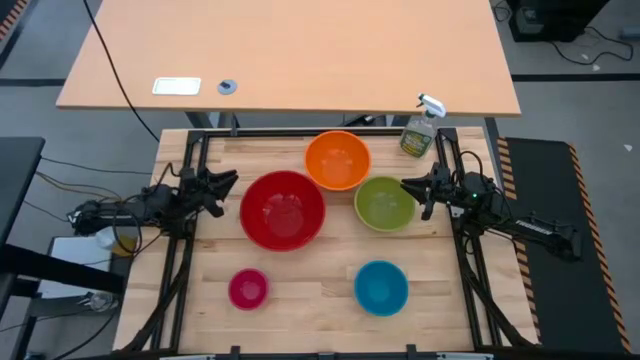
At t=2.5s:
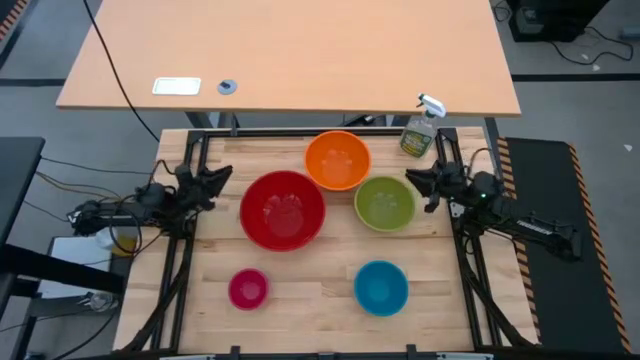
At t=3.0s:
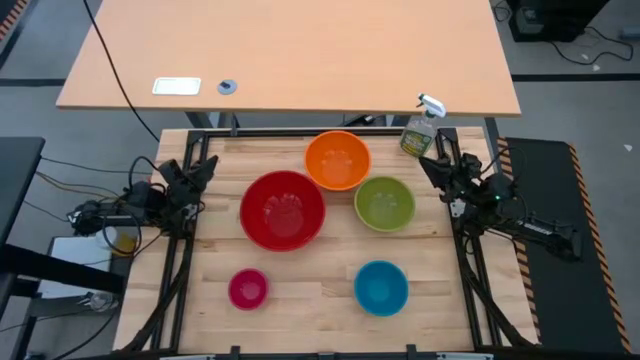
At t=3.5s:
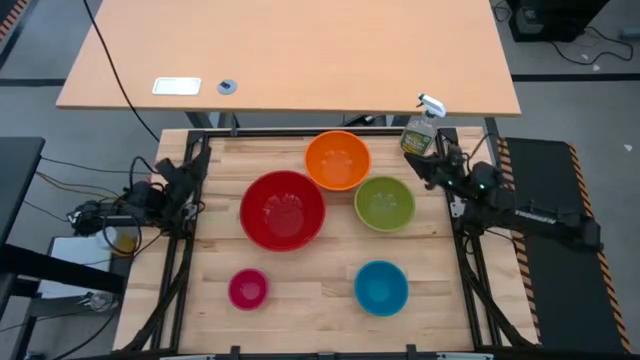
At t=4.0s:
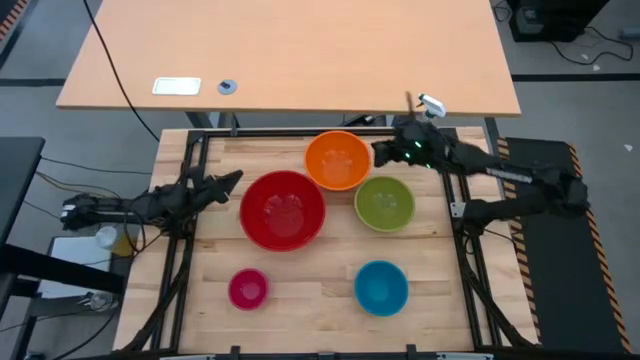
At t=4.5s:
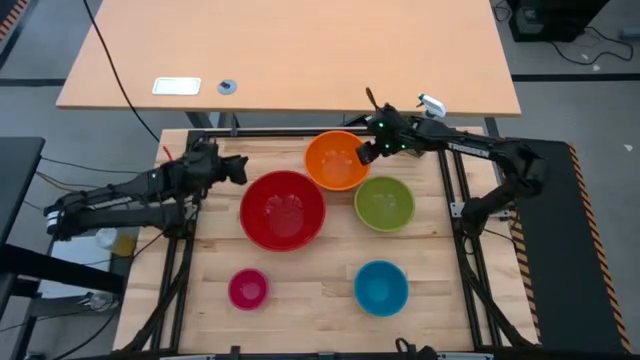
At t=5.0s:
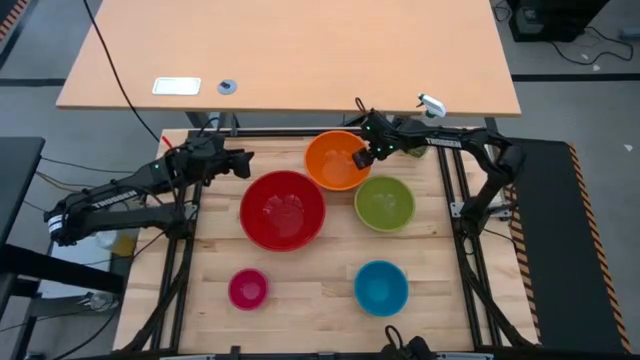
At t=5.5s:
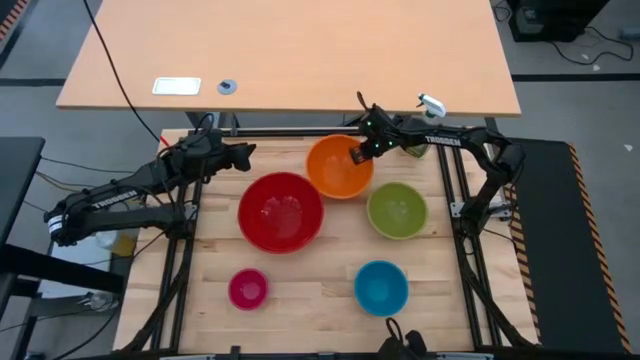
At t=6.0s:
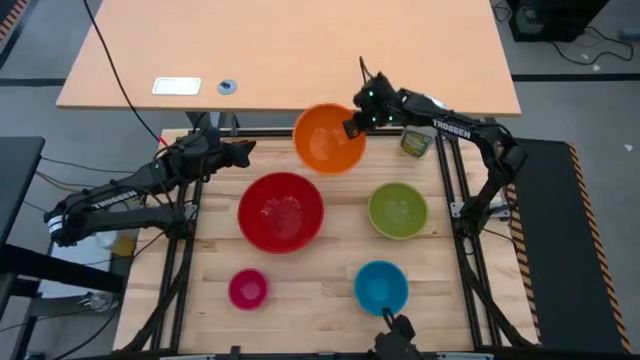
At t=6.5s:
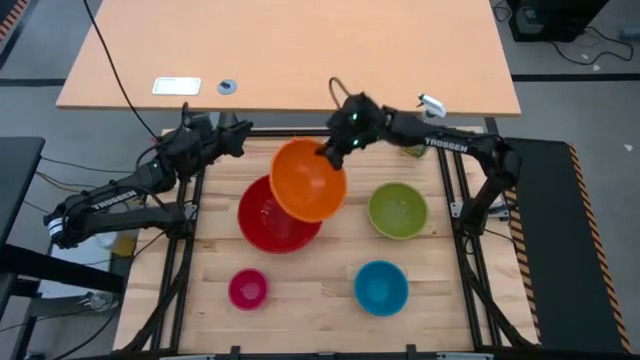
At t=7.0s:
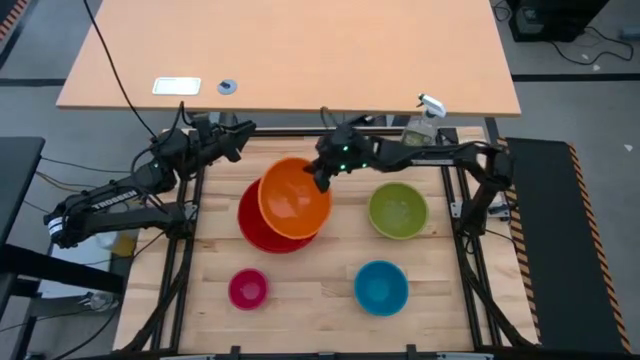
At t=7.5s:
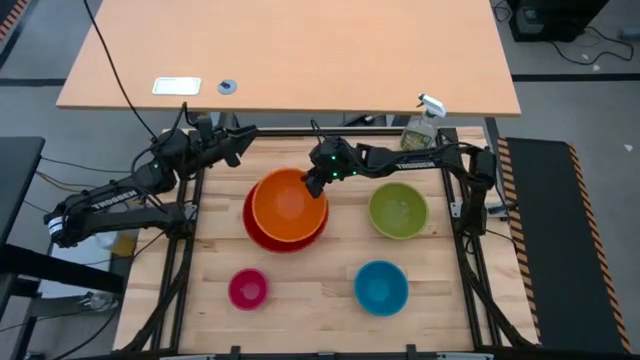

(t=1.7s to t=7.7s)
Stack the orange bowl on top of the red bowl

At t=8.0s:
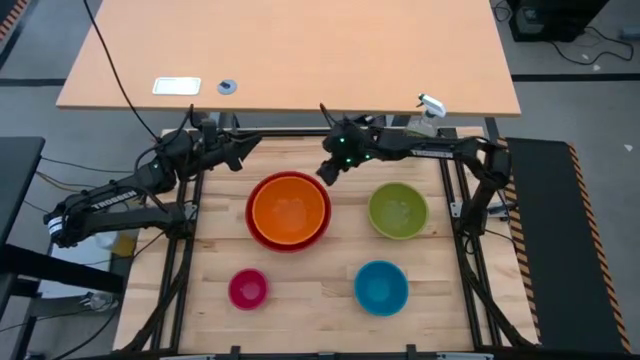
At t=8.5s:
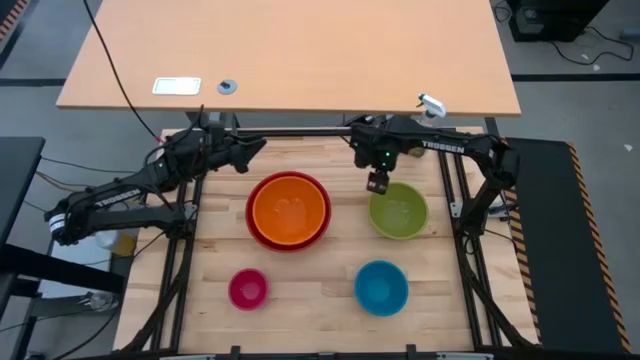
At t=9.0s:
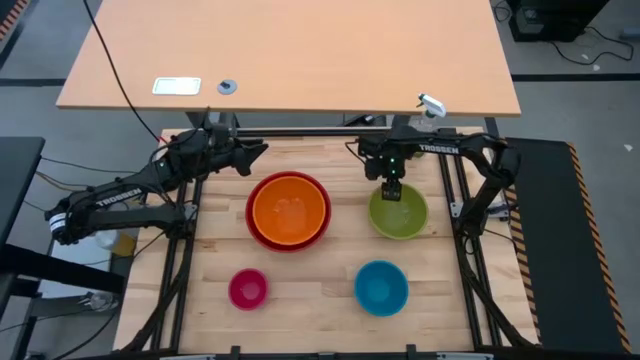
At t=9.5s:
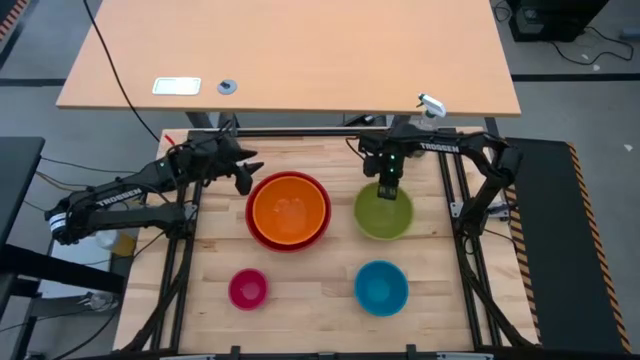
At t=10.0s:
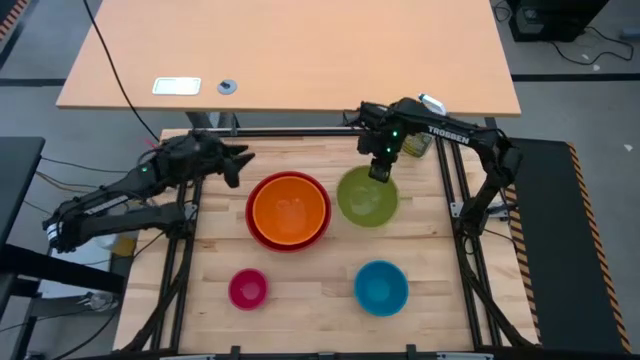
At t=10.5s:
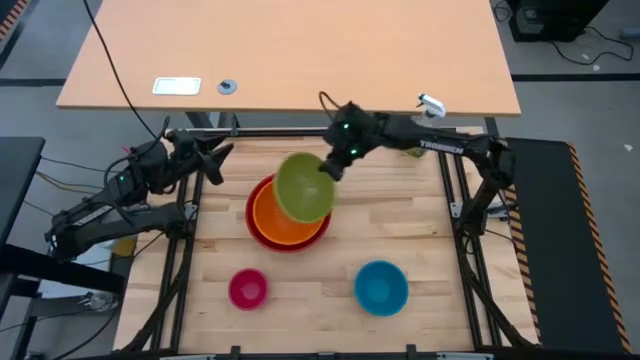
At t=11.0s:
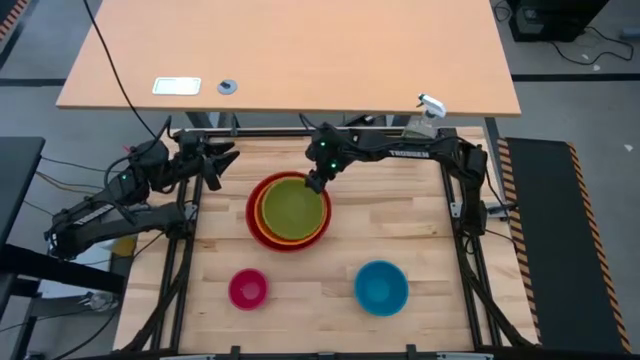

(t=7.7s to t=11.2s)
Stack the green bowl on top of the orange bowl

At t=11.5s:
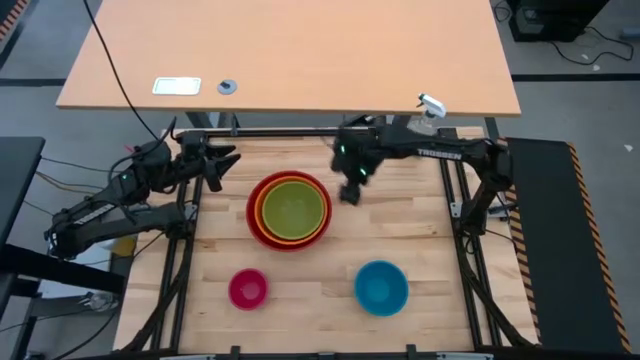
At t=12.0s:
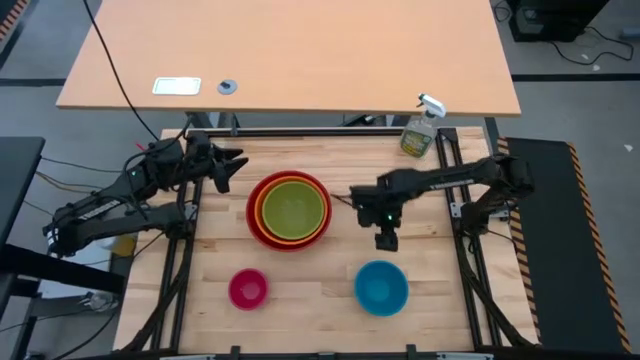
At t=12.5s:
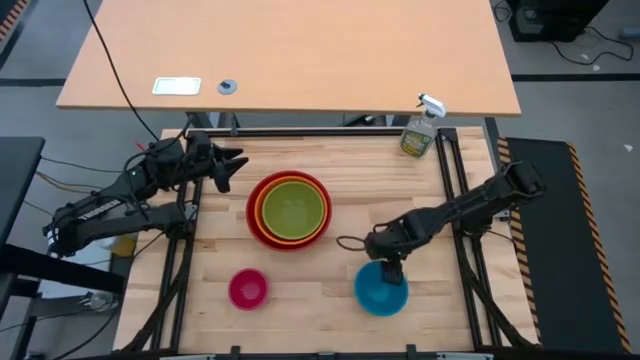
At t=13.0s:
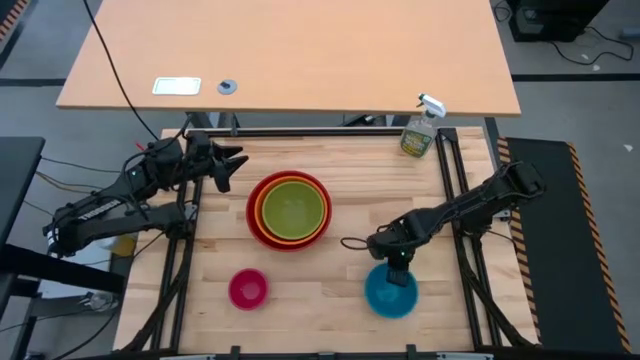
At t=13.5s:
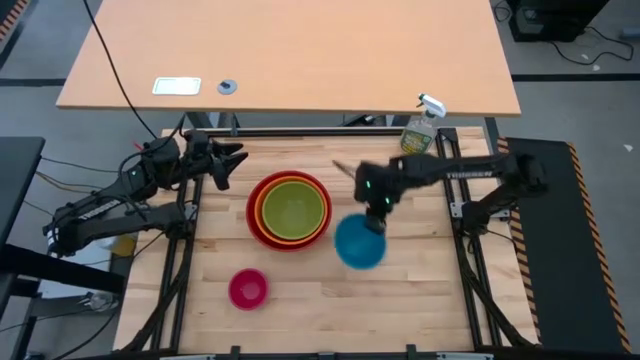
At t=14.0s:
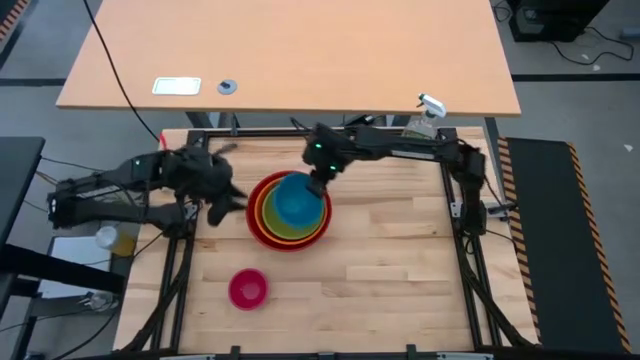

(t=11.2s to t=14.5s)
Stack the blue bowl on top of the green bowl

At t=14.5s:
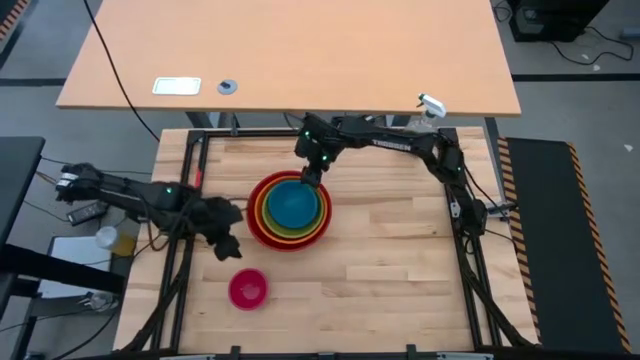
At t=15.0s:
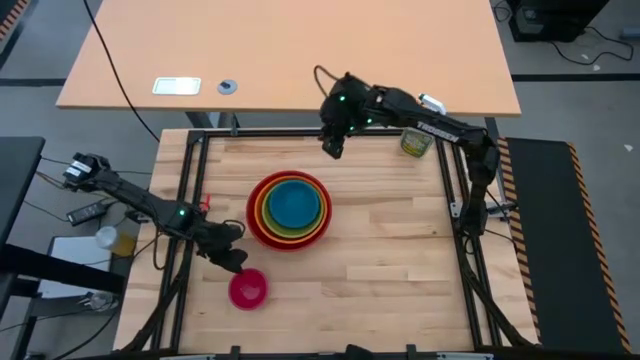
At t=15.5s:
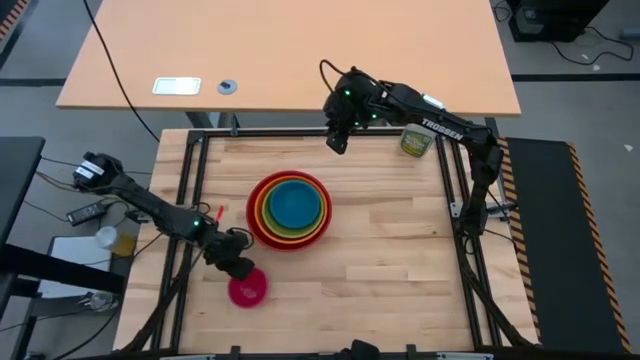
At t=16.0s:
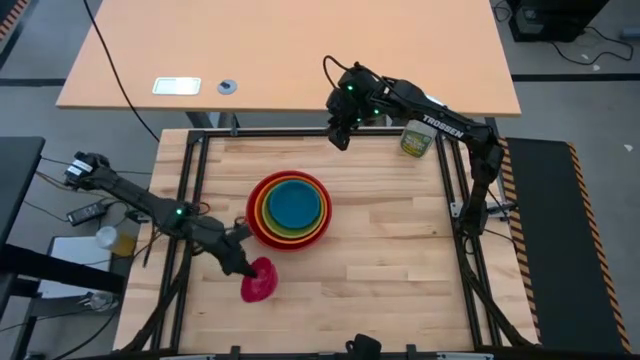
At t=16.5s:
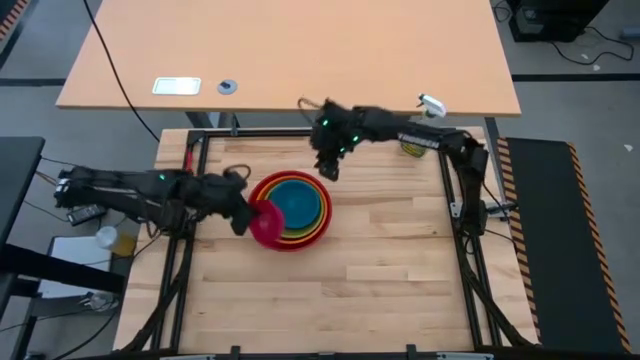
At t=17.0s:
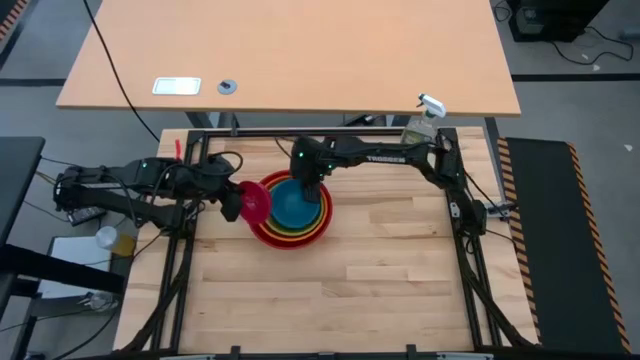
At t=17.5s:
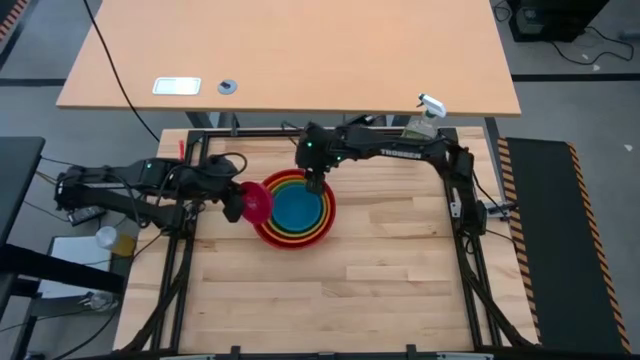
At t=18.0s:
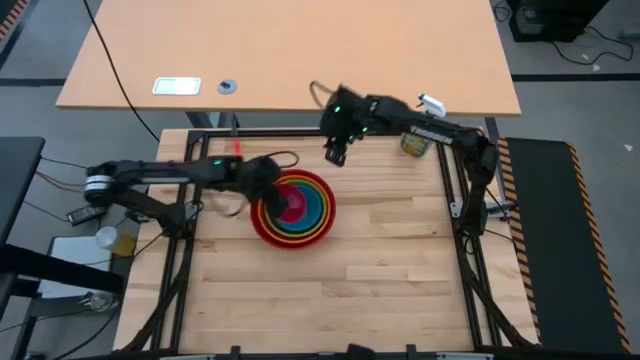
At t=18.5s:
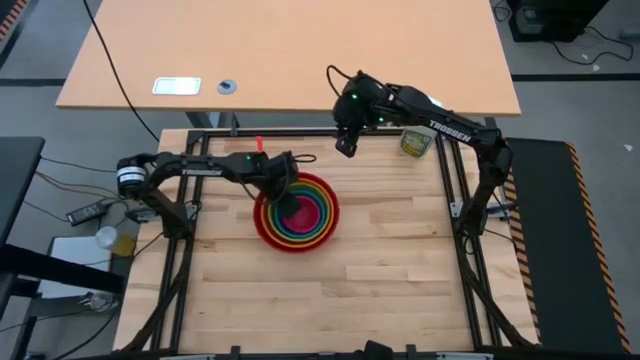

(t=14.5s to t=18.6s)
Stack the pink bowl on top of the blue bowl

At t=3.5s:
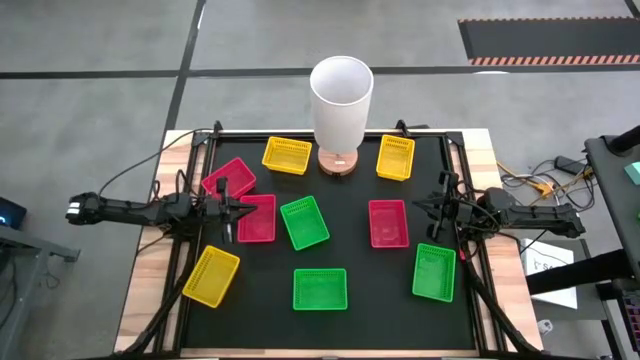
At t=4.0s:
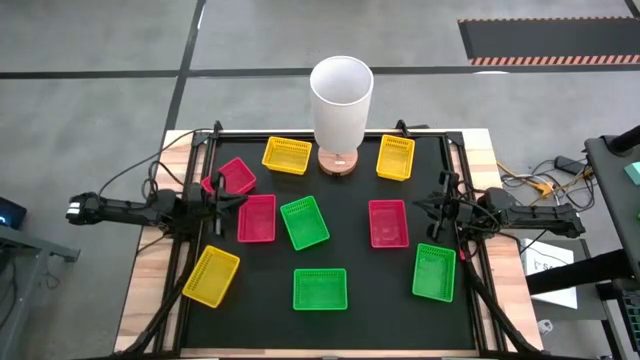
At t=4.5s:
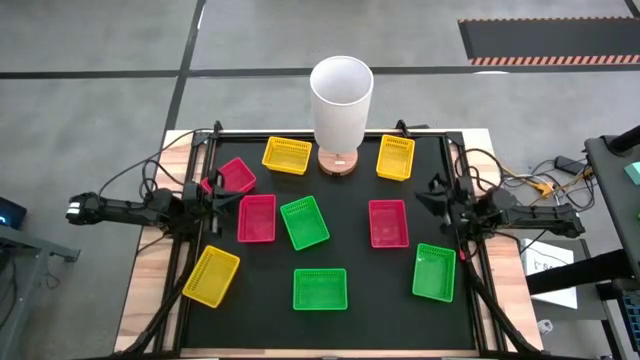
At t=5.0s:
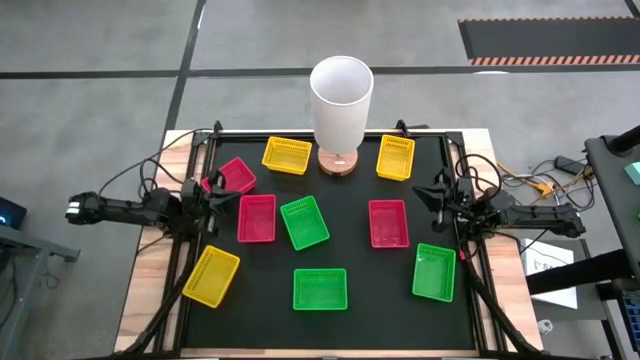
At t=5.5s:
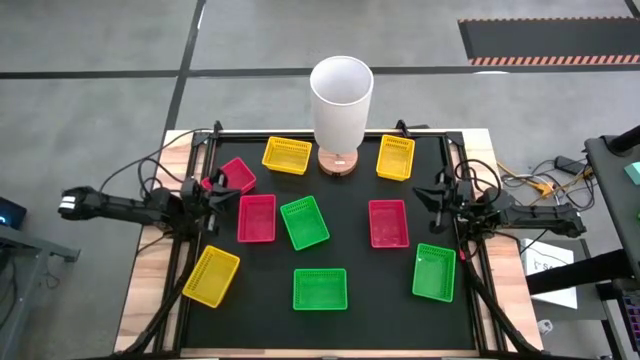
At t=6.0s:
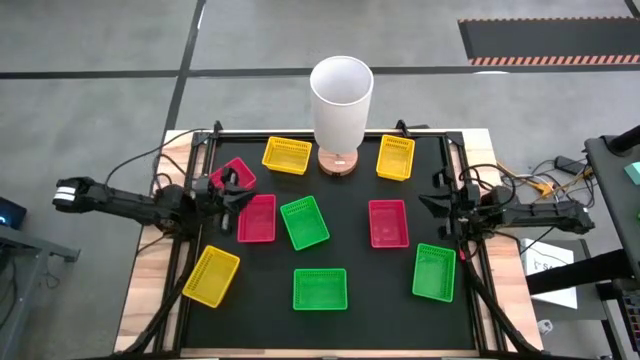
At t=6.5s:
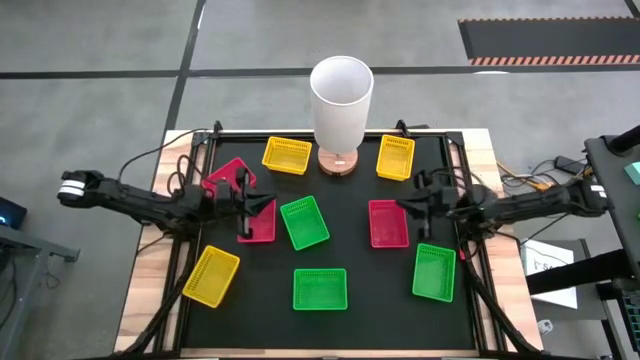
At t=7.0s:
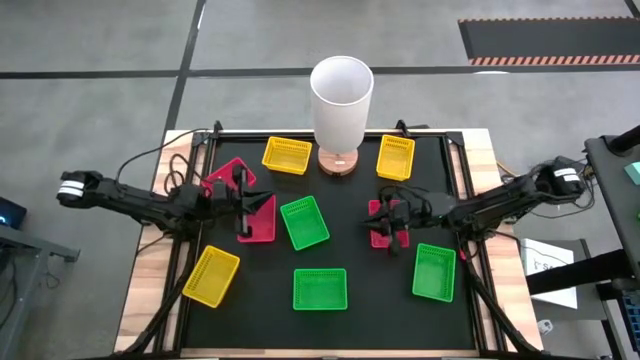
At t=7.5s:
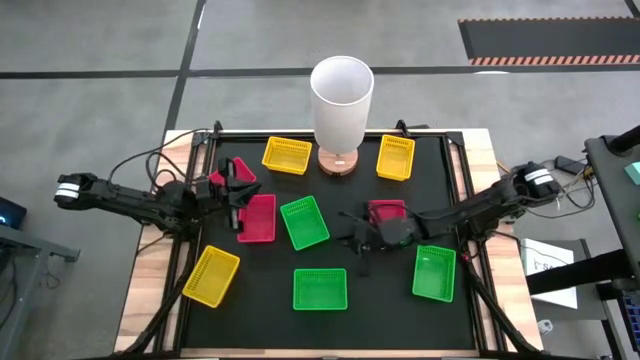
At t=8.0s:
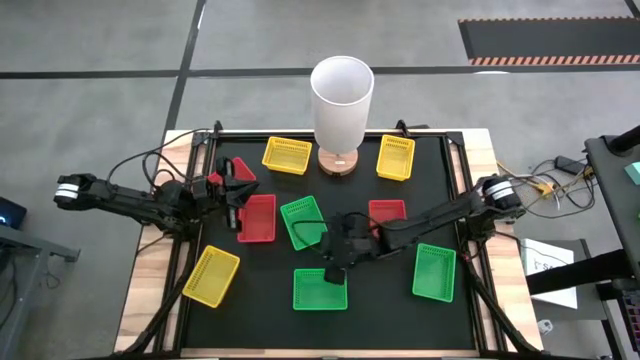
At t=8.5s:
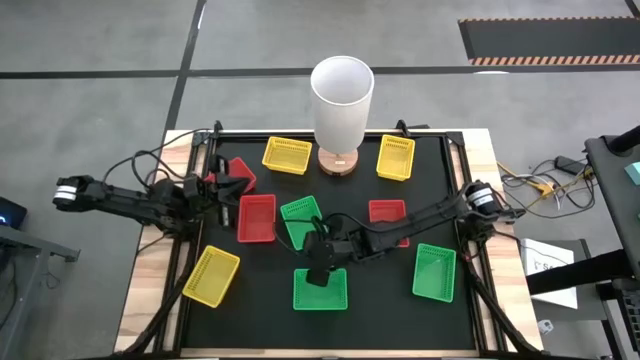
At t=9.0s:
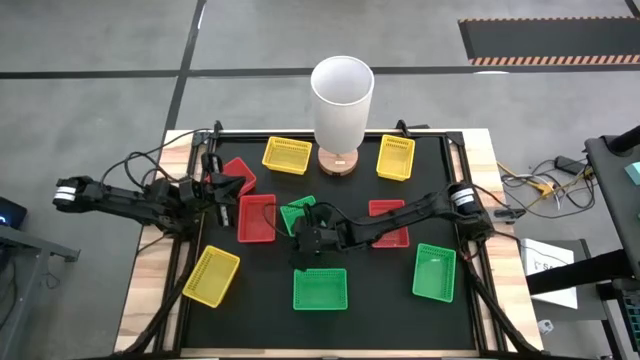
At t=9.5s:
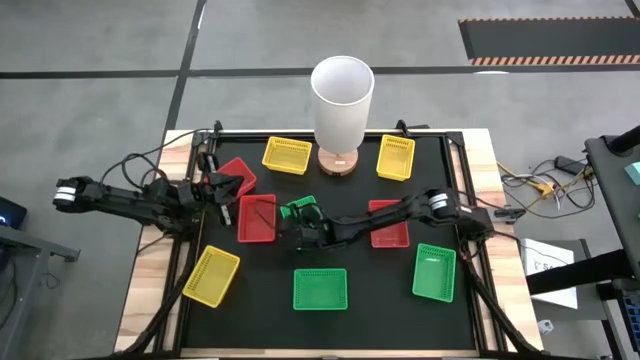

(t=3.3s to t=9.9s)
Stack the top green bin on the bottom left green bin
